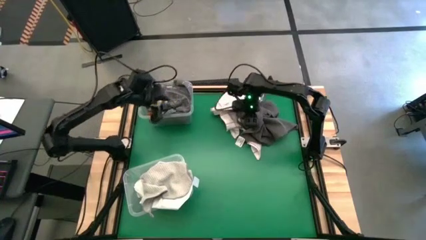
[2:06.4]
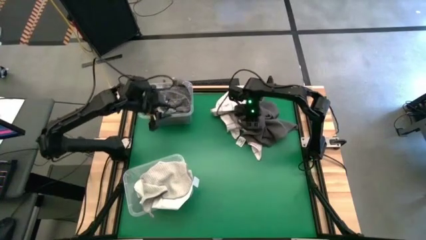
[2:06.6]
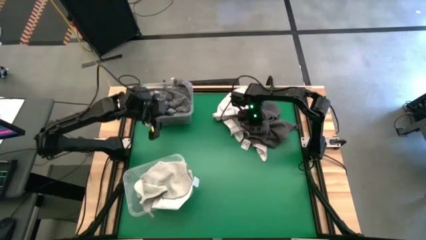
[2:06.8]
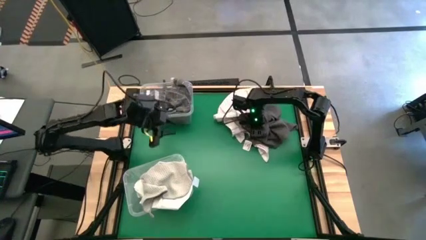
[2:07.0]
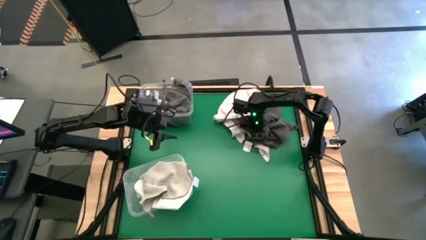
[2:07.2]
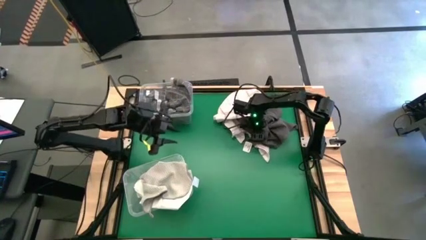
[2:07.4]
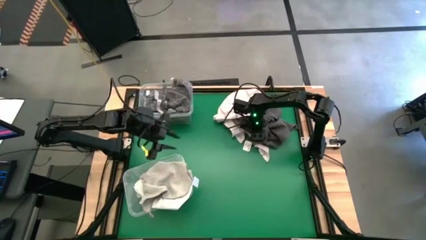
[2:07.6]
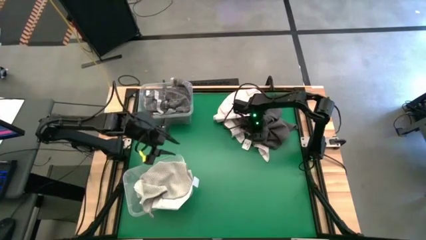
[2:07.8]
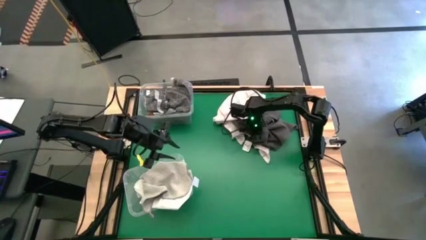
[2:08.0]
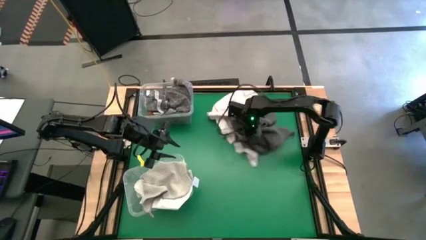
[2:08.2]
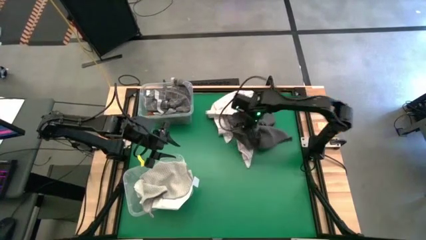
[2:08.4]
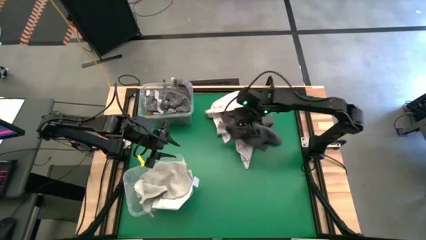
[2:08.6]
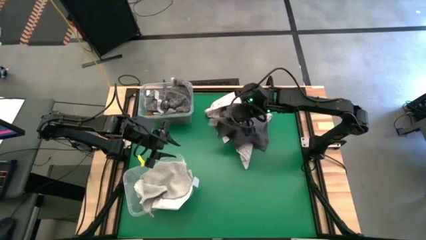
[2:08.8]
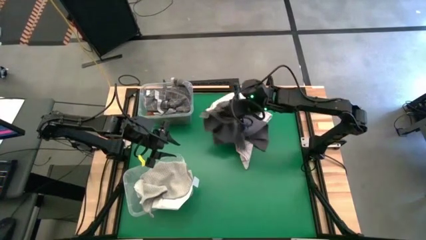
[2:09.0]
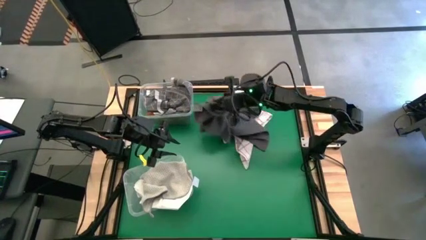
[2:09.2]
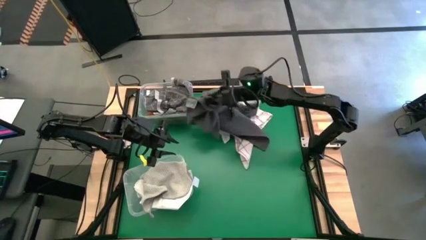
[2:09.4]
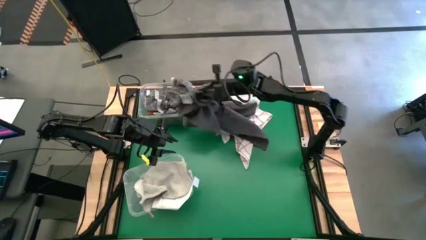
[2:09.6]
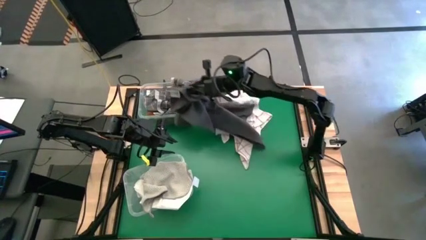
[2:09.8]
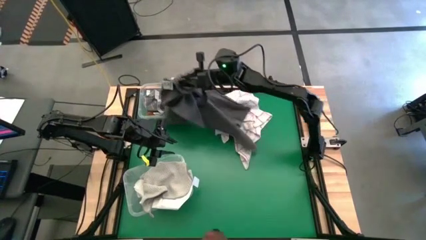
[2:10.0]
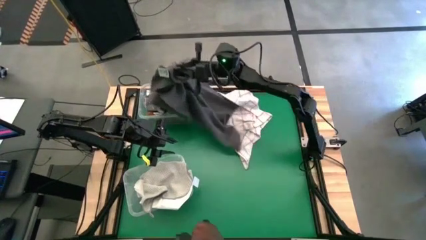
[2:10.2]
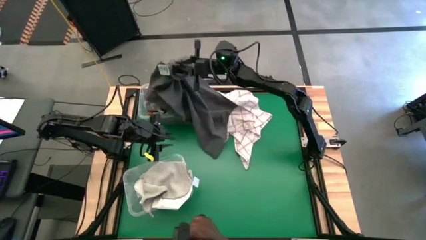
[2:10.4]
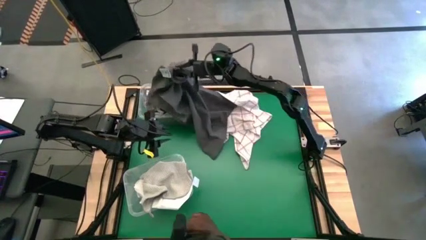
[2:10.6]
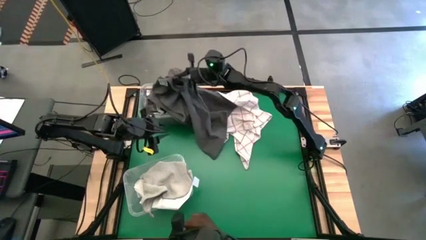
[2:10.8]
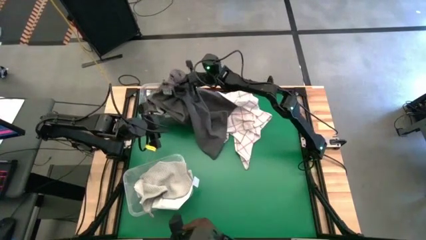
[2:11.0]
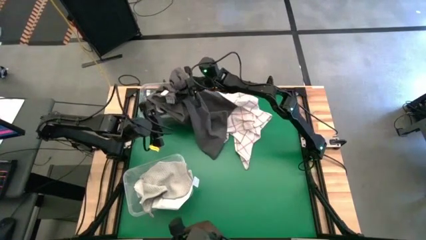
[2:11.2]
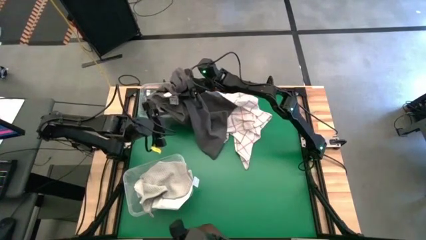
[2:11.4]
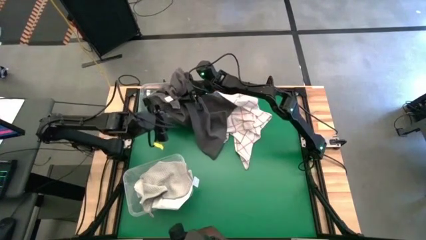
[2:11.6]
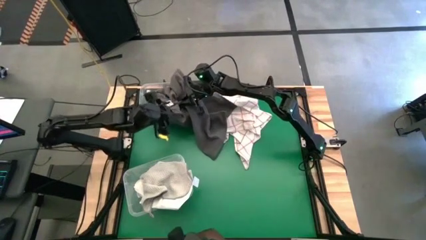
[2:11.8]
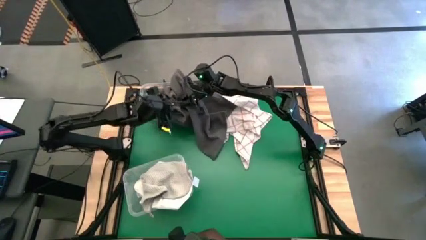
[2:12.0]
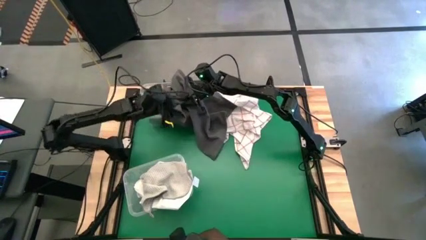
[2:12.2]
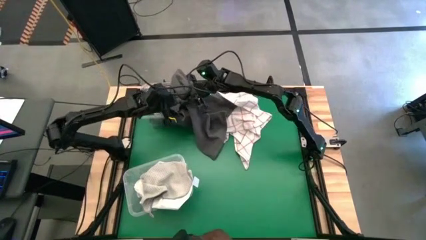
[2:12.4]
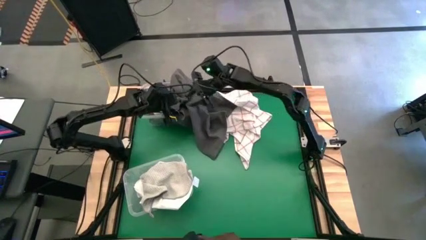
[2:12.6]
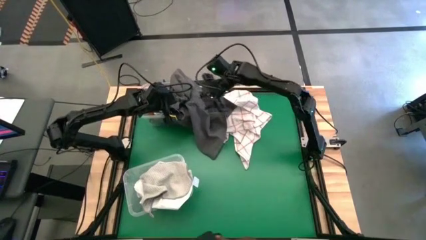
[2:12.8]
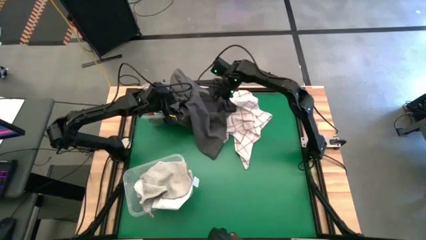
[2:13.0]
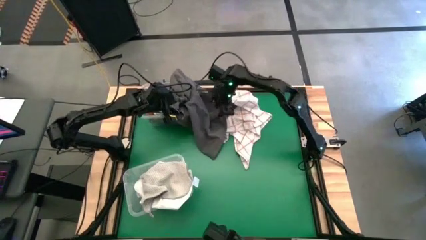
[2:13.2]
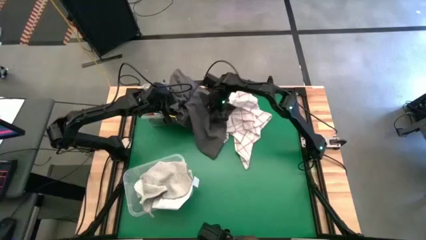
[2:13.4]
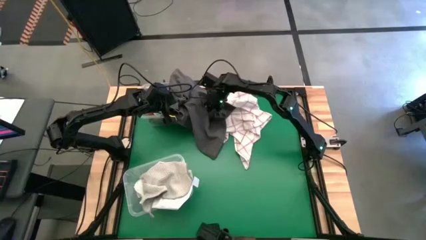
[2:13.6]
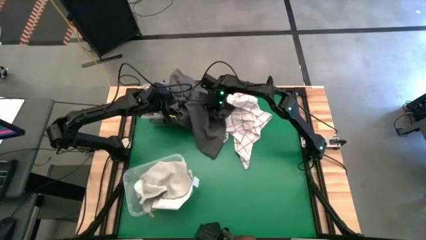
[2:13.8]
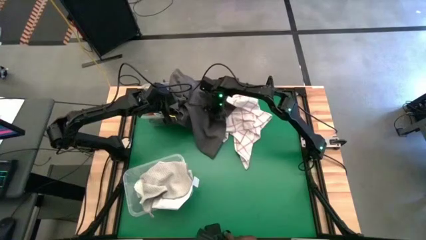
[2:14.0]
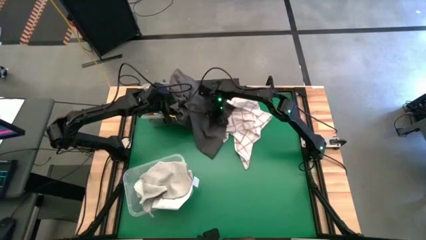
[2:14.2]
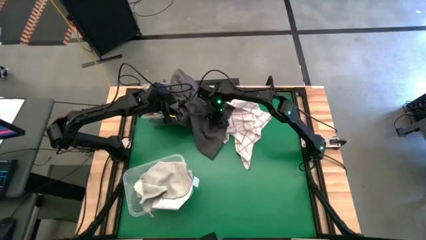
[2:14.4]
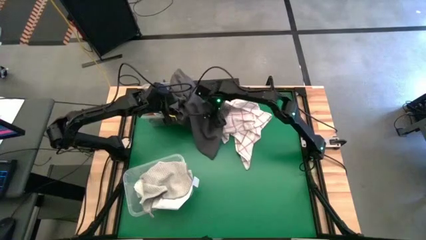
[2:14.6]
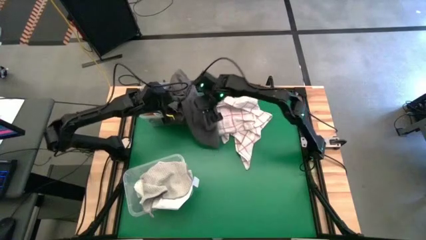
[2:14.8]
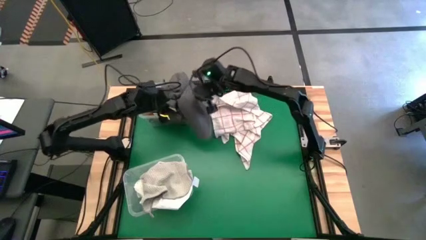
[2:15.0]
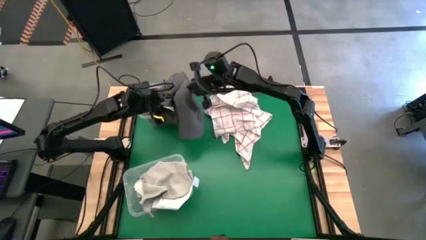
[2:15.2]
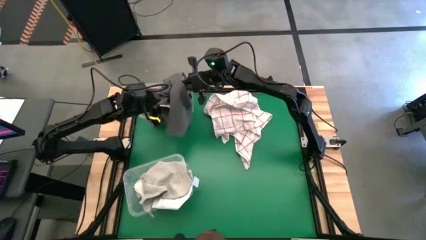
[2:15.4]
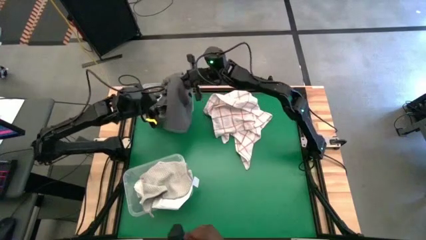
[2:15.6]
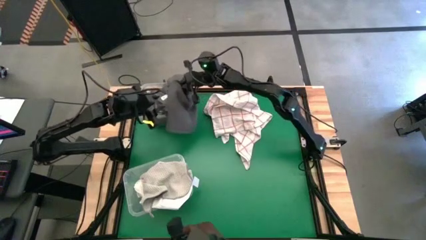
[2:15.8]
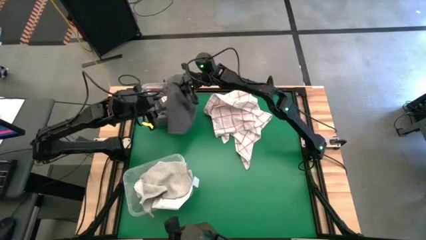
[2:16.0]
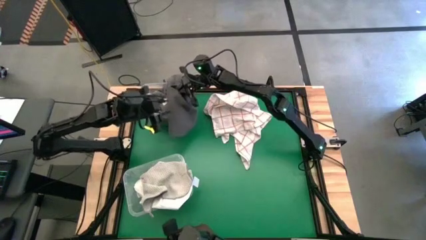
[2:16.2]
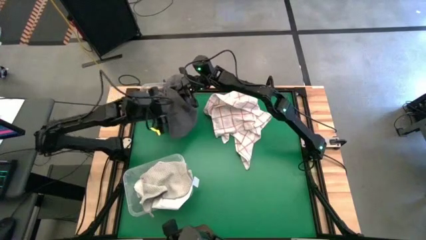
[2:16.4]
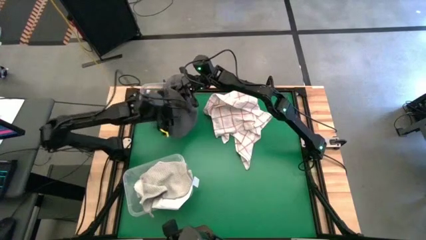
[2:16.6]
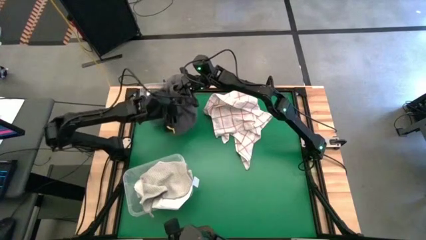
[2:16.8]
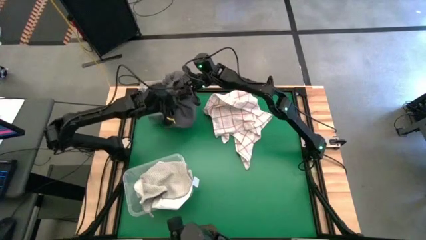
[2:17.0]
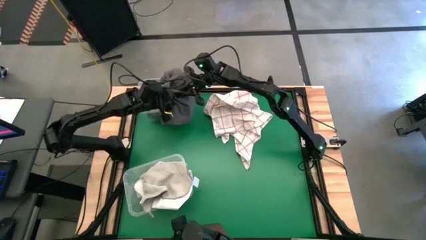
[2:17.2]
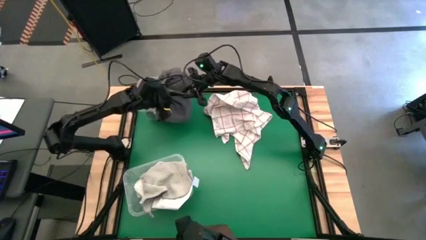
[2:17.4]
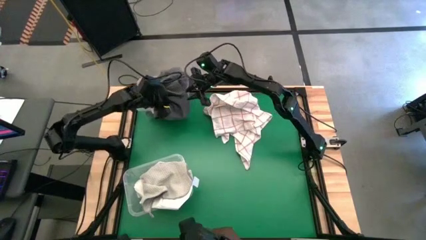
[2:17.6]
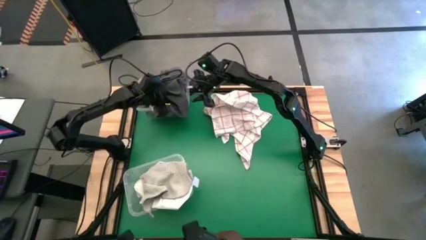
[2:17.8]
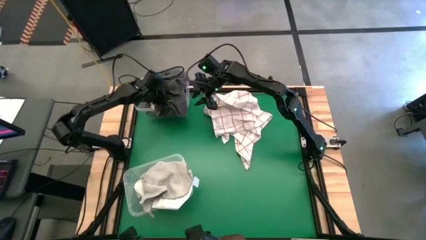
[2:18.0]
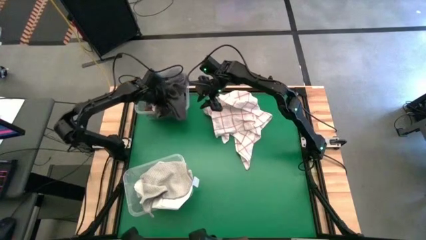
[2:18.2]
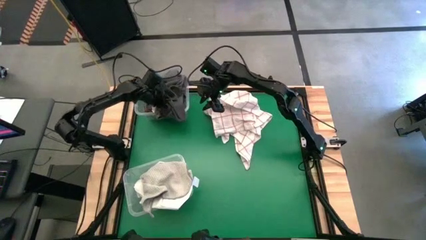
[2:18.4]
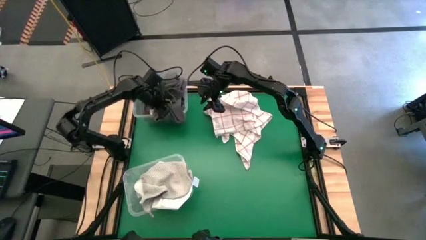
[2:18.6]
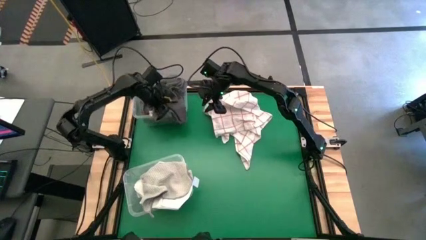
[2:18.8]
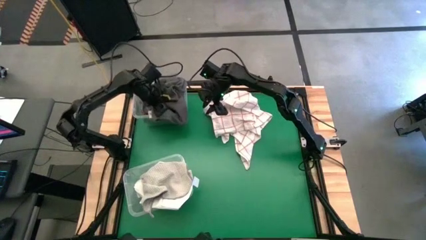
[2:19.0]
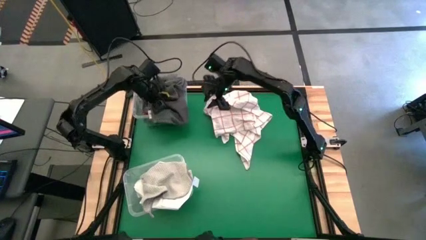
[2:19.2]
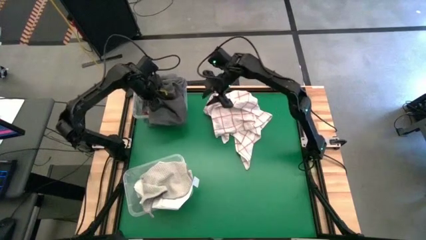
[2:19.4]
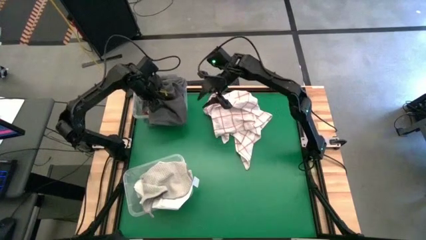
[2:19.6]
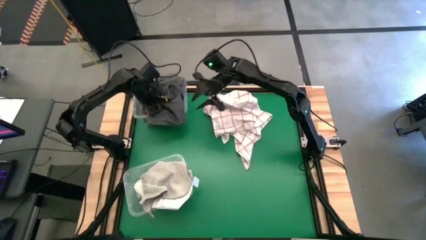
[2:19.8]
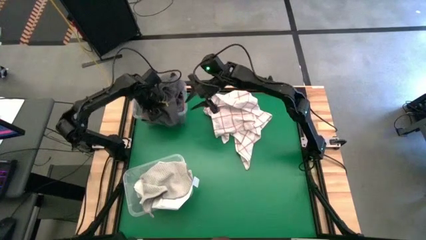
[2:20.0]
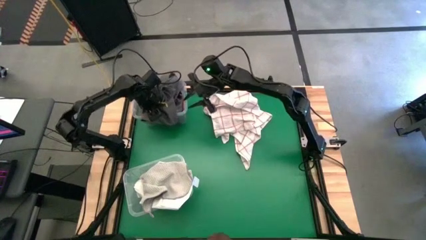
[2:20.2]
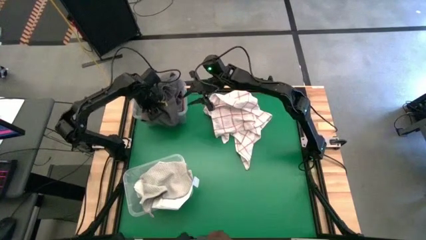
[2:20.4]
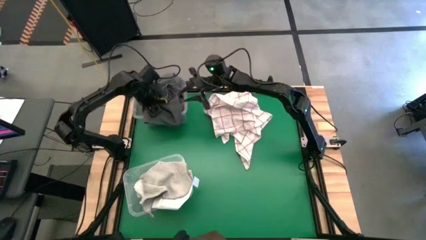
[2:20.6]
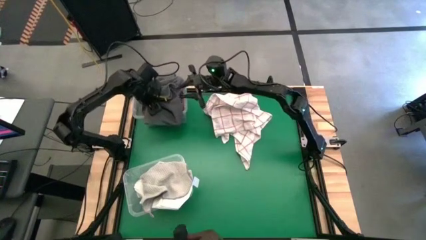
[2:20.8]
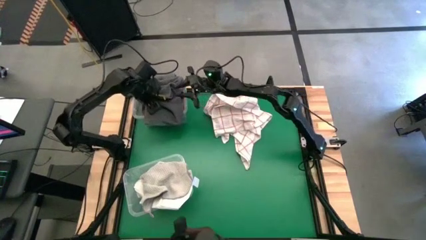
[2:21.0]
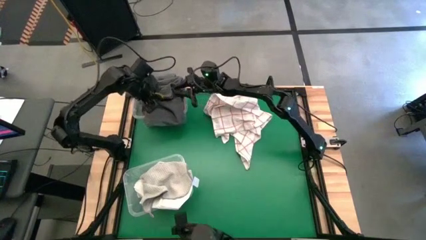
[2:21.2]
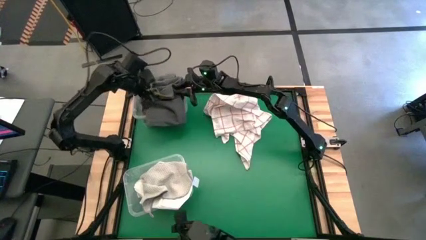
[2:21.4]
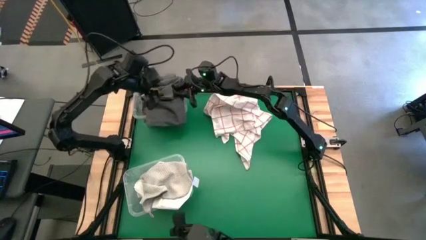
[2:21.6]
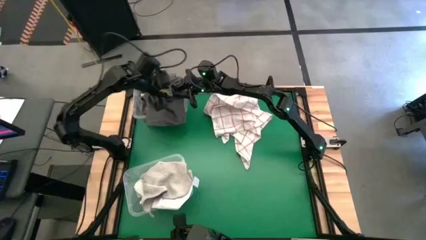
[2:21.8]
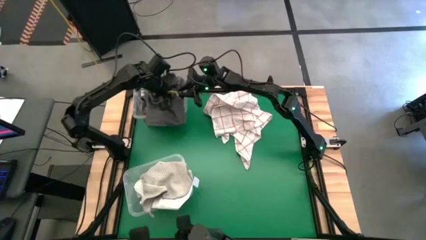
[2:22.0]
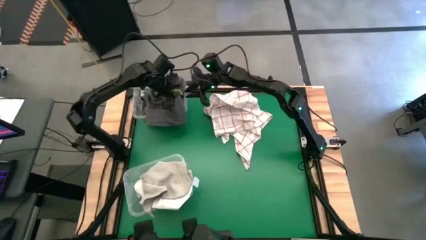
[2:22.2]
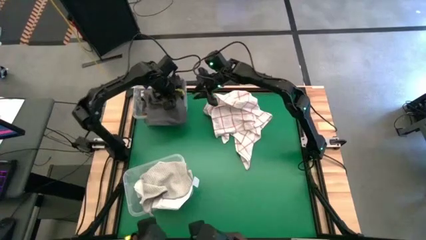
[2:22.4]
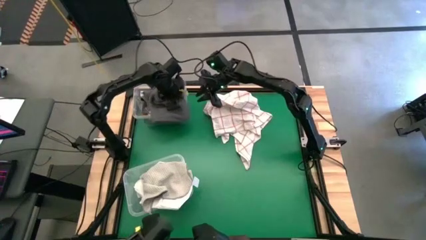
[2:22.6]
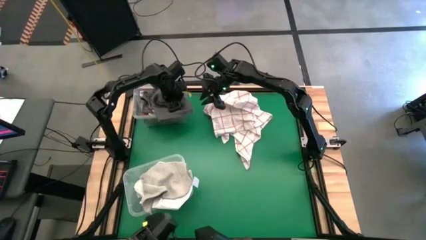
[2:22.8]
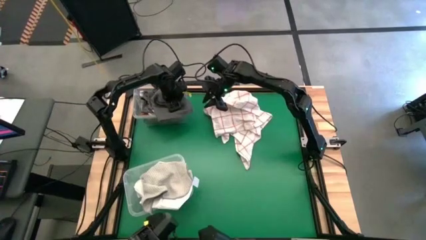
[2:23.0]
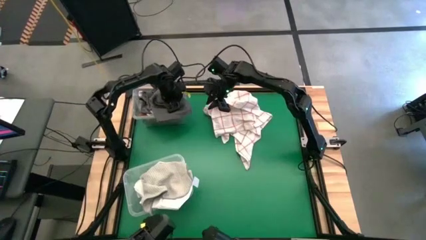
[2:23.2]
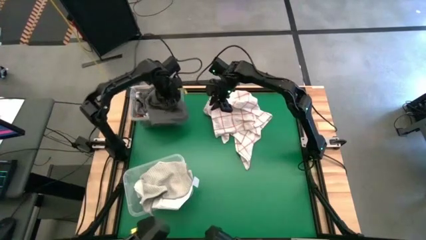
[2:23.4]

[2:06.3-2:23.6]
Task: Sort towels by color in basket
Put the black towel into the top transparent bin
